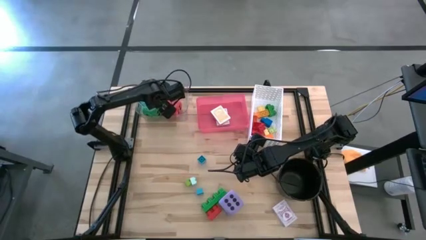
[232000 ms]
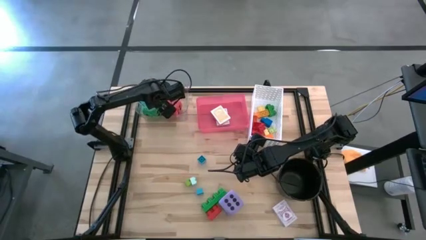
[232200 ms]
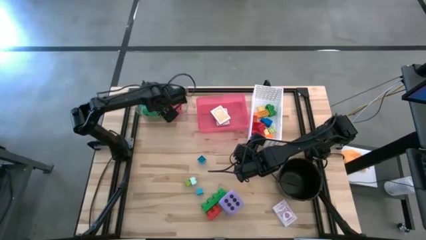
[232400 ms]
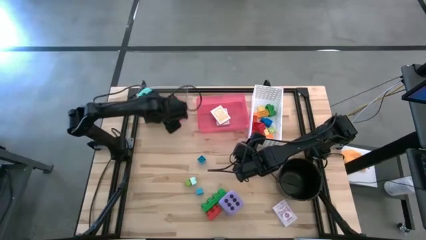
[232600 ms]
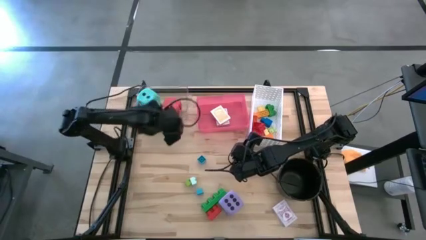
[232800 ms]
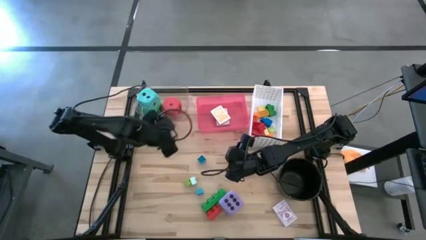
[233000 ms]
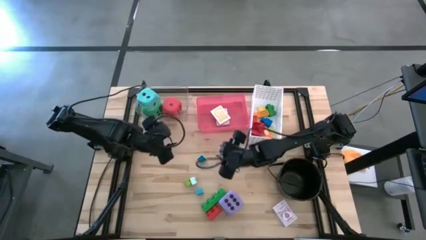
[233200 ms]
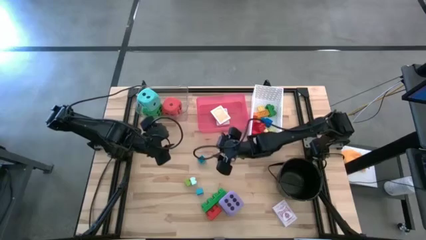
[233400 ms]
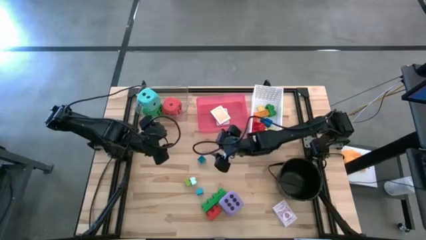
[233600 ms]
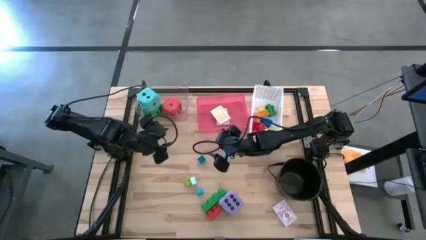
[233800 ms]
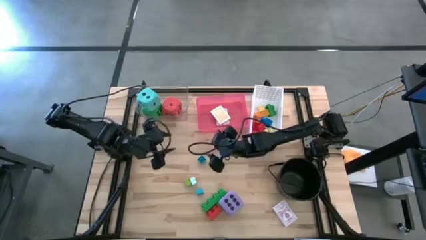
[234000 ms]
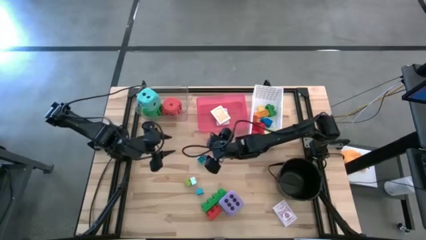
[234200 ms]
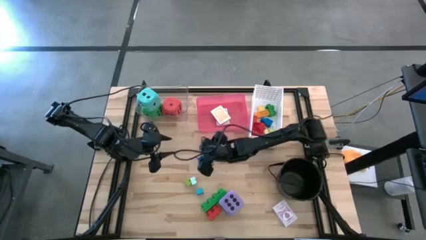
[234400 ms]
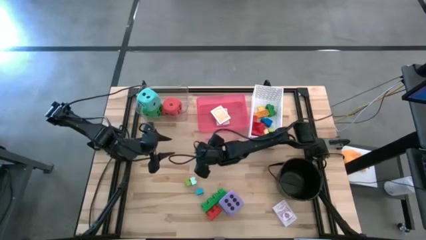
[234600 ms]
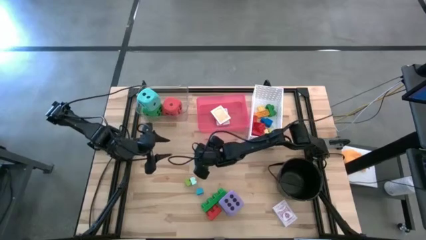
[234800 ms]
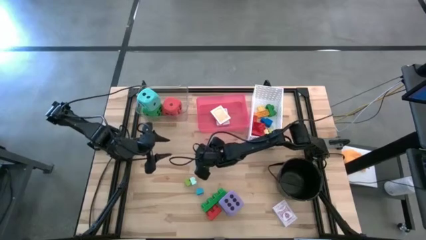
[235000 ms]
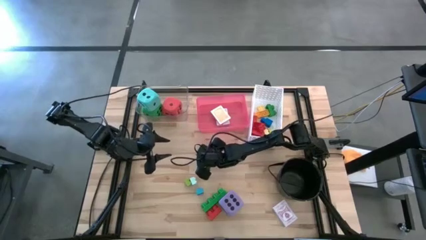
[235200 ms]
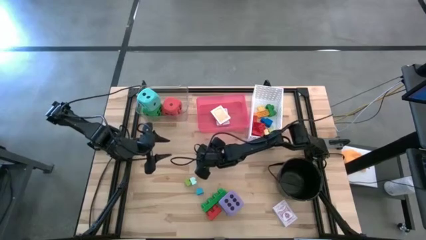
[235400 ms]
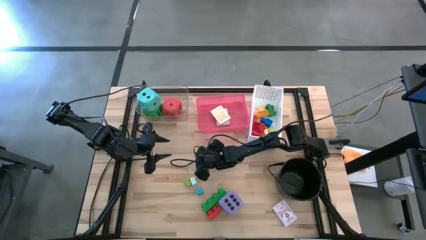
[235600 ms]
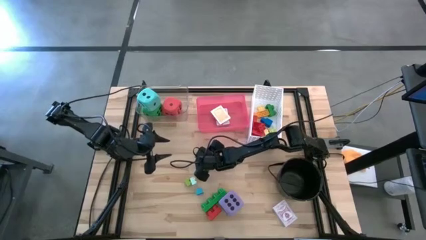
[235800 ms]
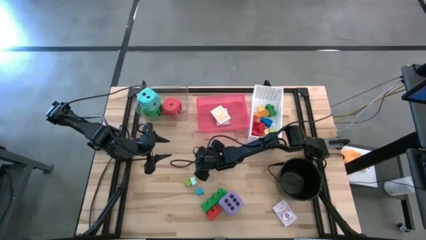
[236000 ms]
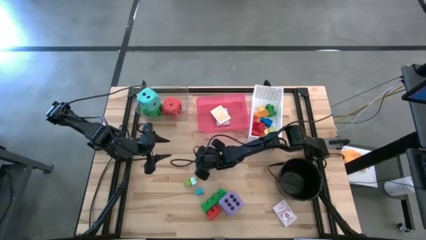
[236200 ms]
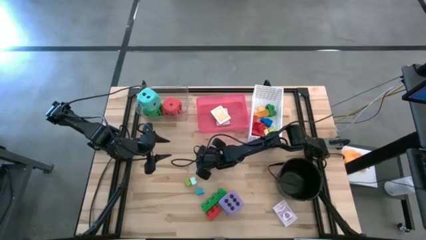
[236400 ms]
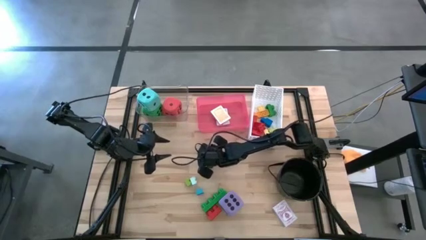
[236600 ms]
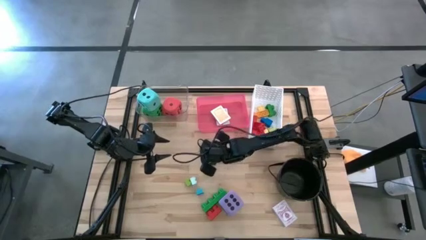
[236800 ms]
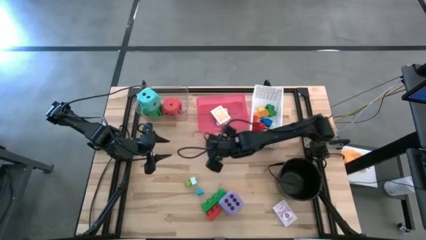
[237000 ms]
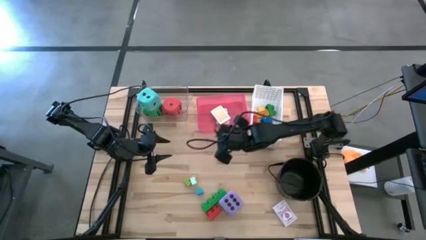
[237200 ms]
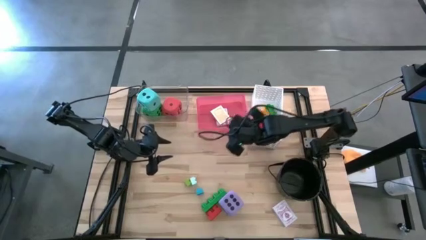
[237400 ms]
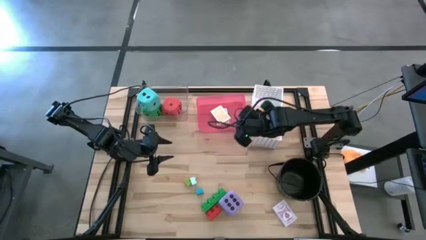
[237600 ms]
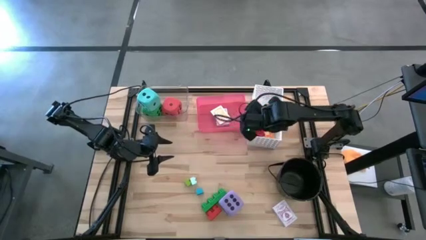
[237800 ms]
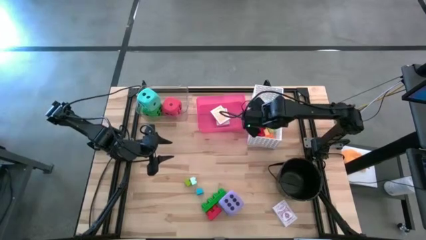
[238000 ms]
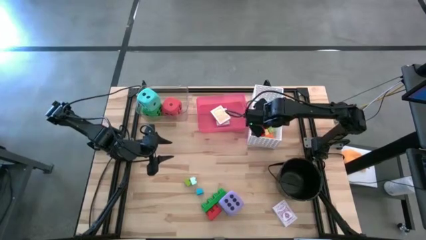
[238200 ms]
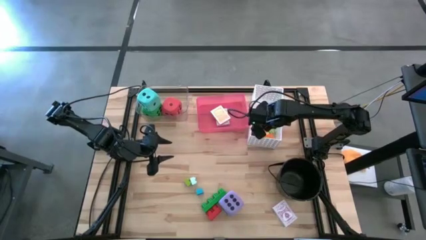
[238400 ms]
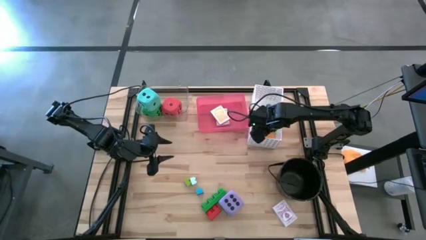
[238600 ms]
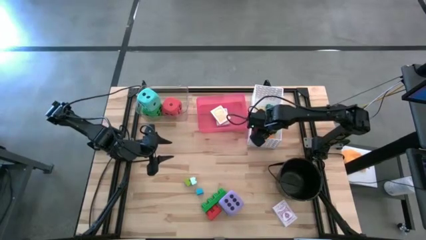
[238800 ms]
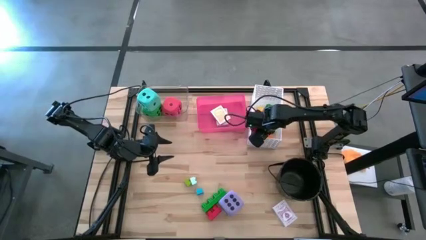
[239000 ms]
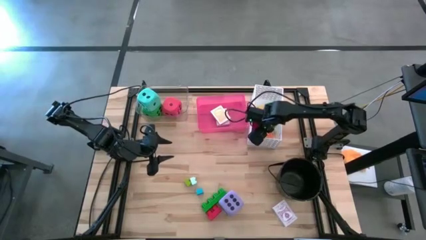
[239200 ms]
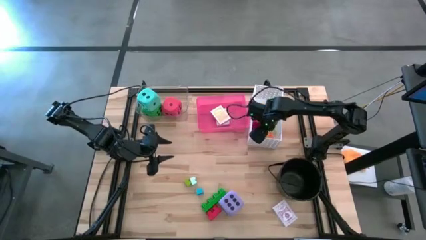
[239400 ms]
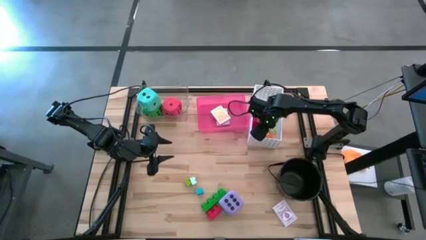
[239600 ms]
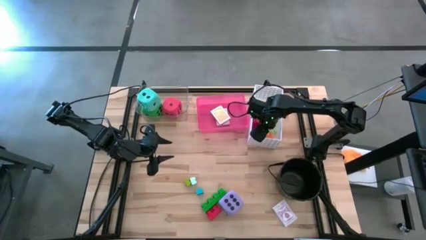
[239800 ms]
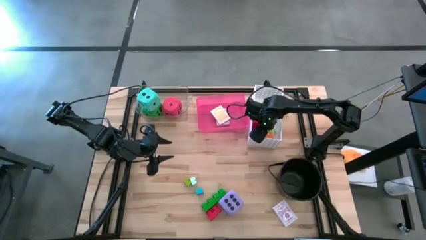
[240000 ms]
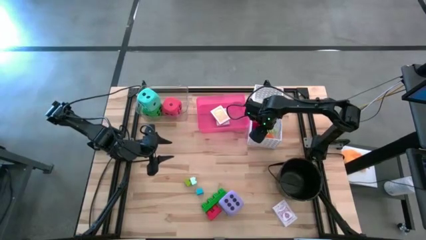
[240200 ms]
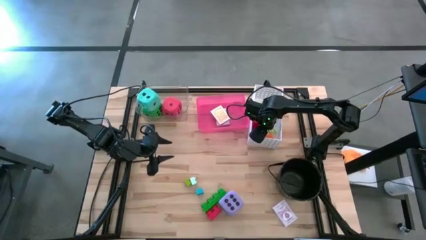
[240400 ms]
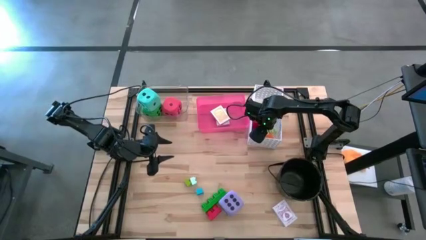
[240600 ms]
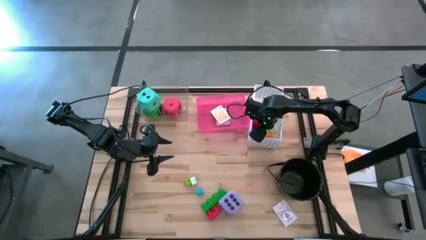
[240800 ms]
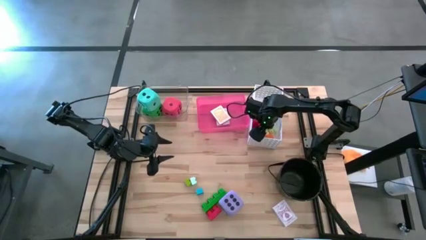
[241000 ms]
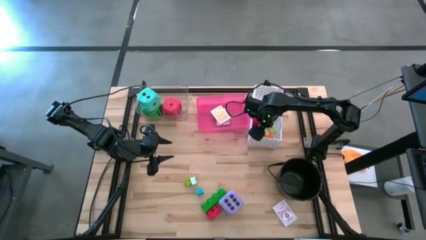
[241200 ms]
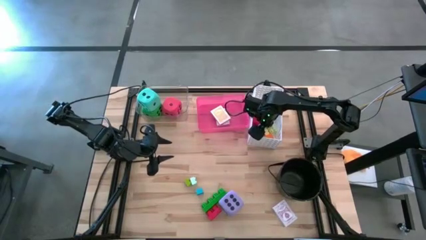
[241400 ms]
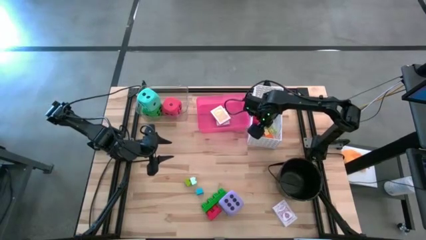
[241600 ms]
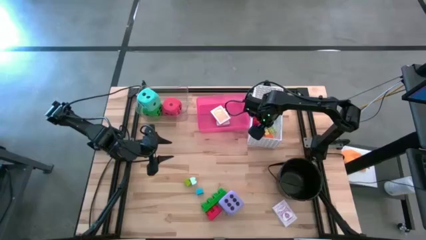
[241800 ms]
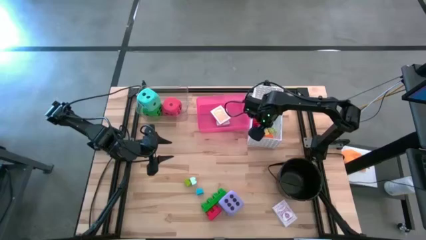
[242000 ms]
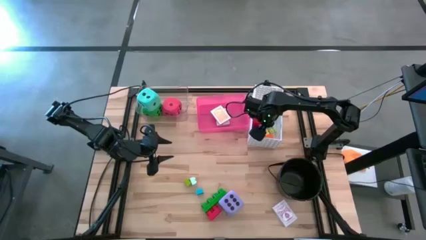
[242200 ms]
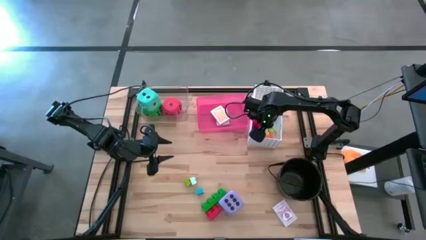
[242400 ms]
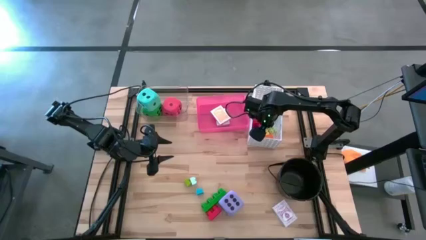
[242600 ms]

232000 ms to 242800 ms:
Task: Pick & Place Toys
Put the top small blue game piece into the white bin

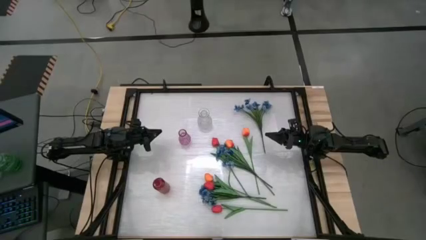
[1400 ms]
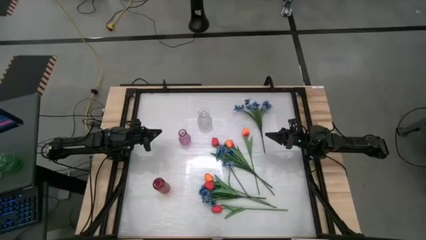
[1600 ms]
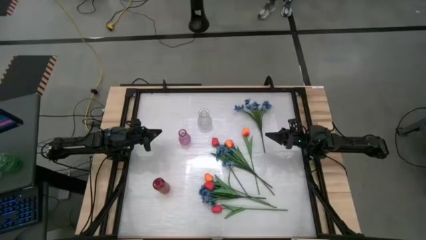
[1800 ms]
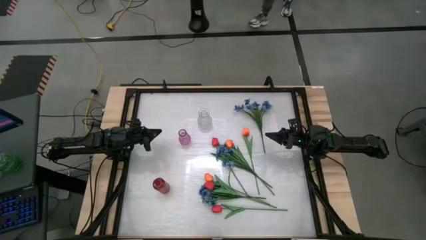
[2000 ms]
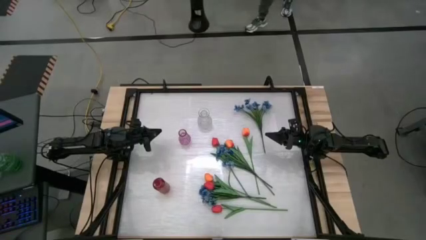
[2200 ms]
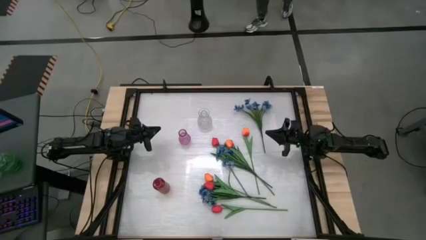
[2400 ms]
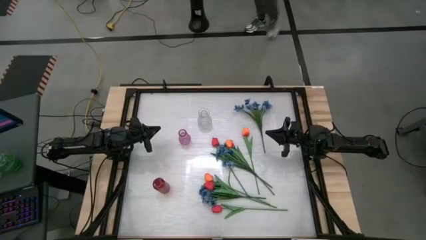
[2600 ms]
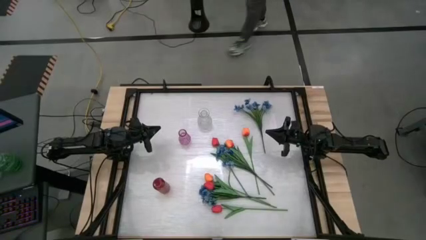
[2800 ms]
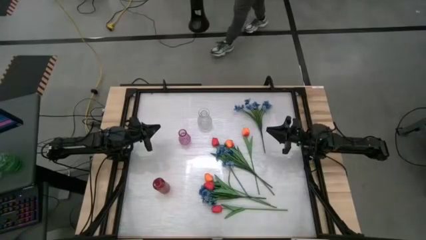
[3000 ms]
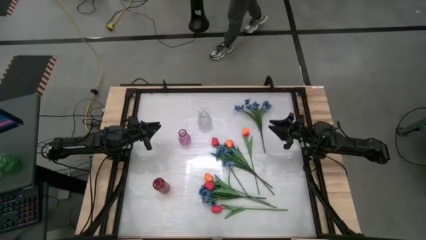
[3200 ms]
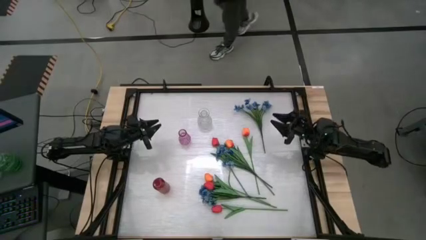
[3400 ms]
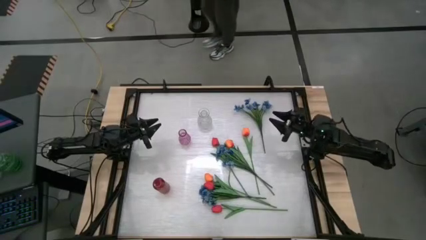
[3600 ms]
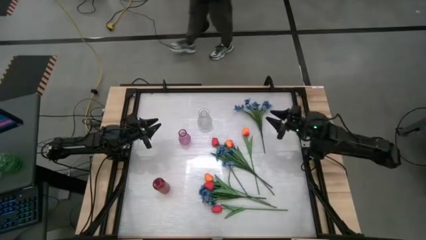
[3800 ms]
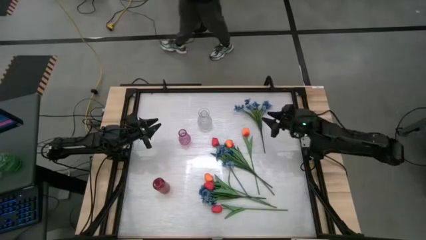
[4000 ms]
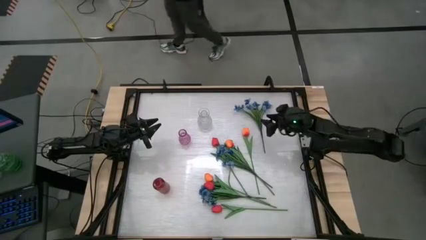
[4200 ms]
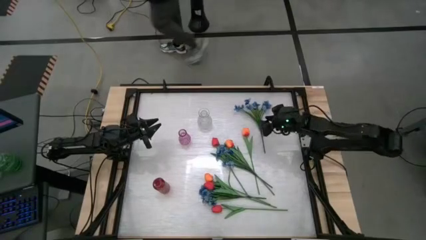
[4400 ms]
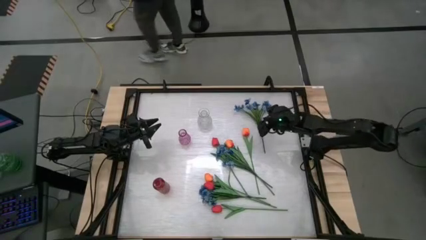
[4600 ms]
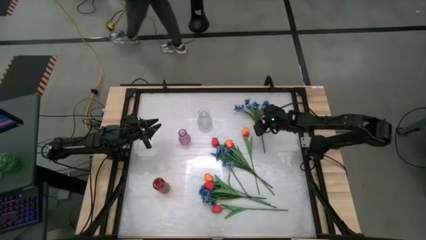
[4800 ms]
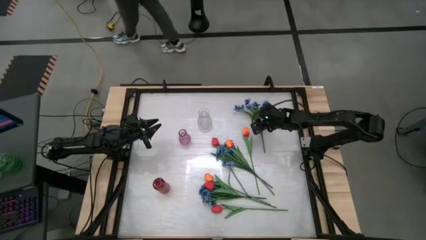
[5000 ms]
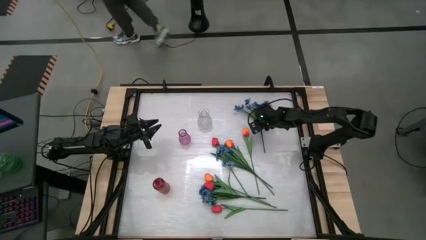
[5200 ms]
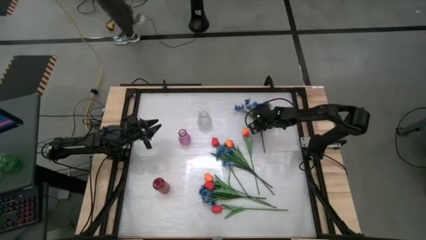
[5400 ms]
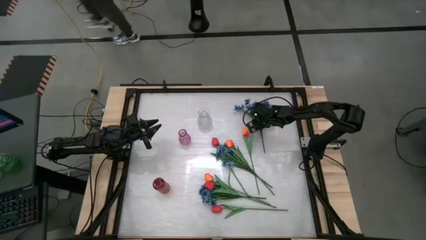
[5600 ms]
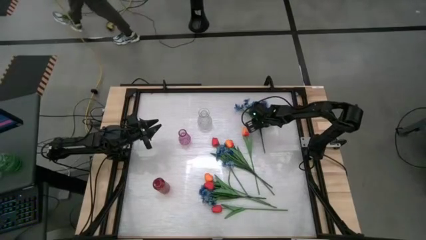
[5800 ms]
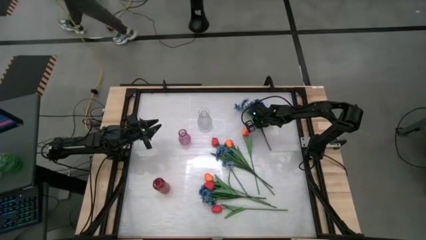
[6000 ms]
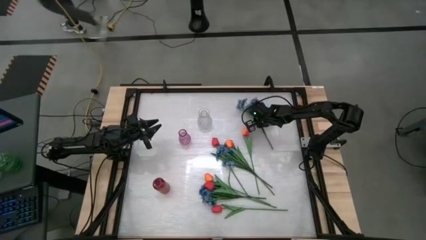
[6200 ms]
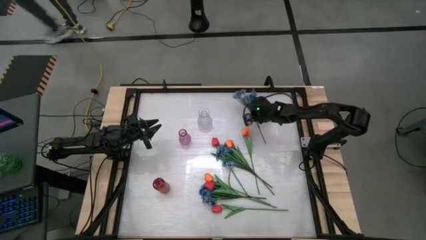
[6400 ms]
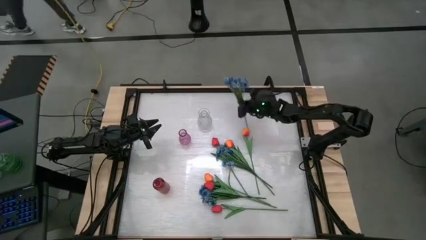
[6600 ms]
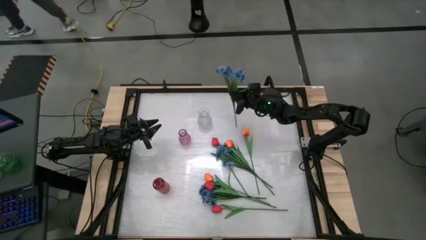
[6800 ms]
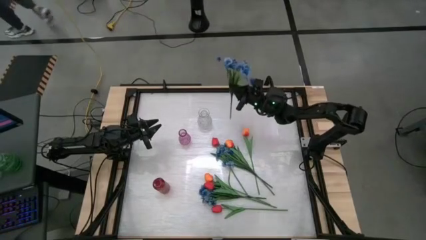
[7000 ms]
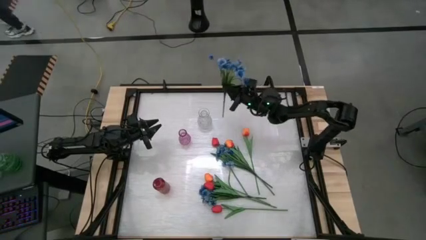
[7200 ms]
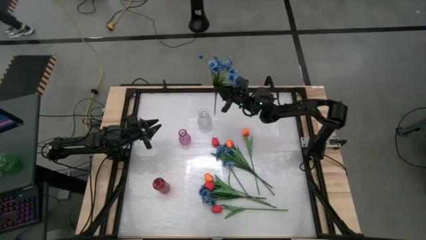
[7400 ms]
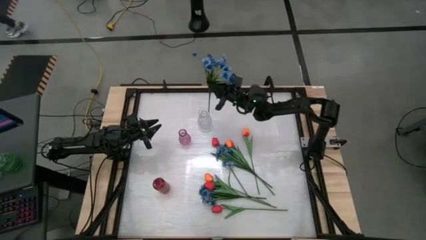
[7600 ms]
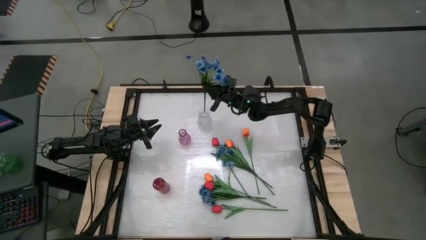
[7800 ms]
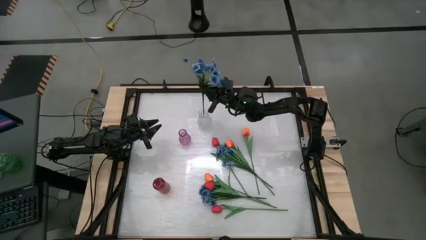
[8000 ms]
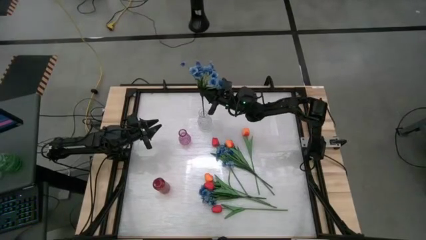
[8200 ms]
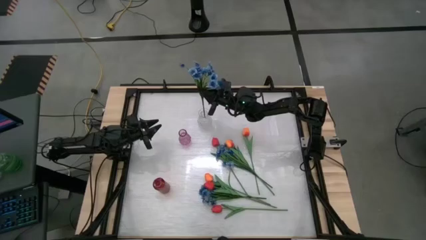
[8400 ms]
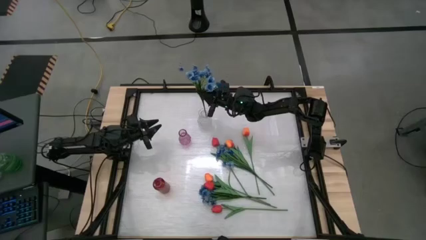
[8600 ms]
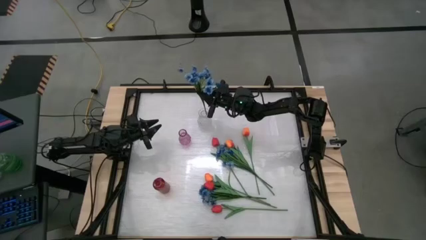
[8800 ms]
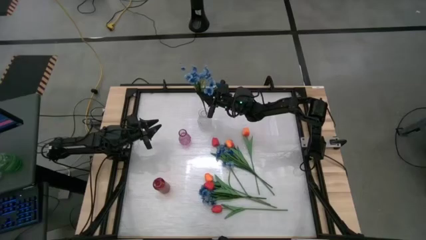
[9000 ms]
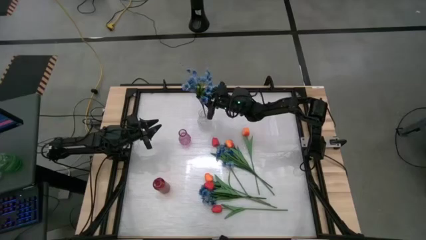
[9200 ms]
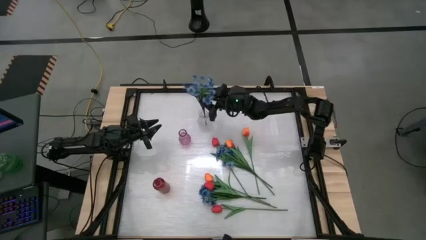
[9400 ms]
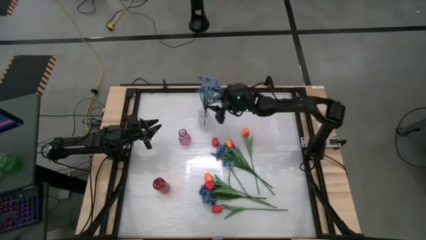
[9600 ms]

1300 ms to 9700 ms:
Task: Sort flowers into vase by color
Put the top right blue flowers into the transparent vase
